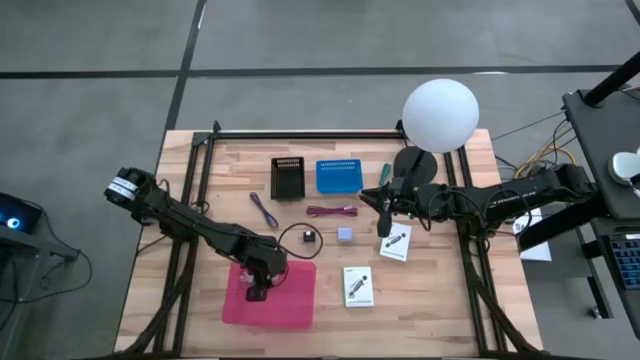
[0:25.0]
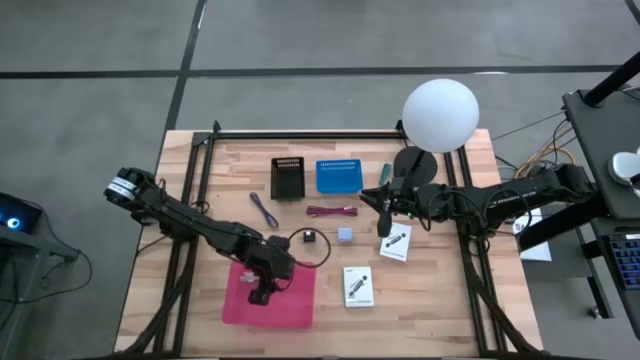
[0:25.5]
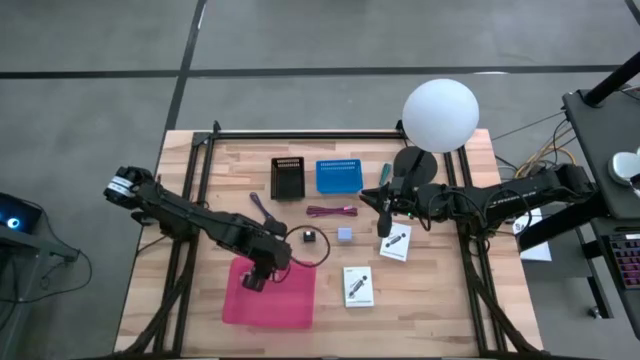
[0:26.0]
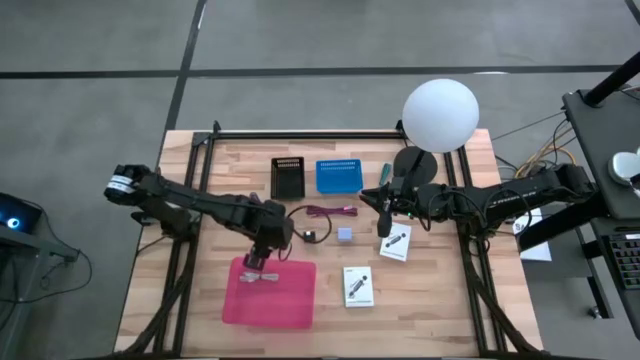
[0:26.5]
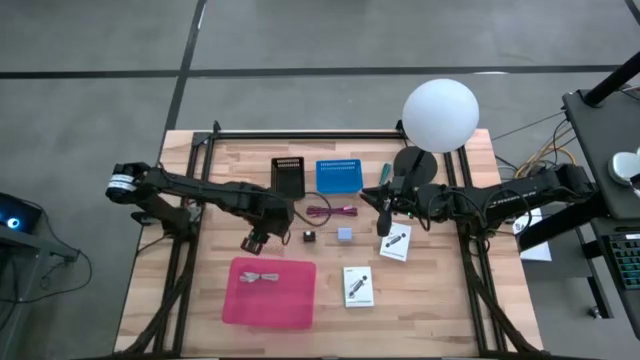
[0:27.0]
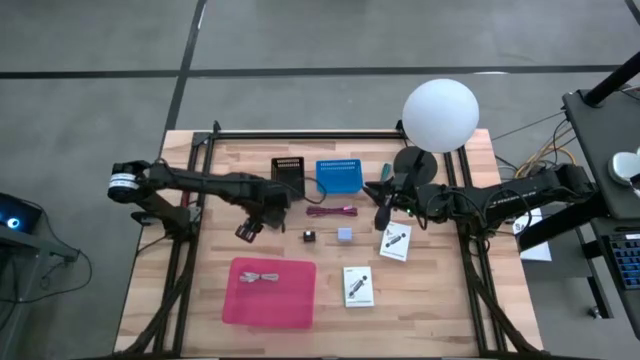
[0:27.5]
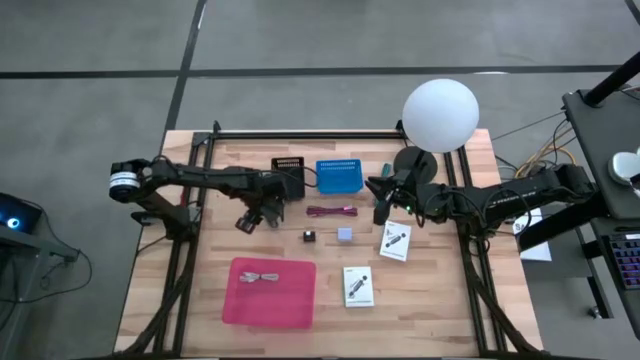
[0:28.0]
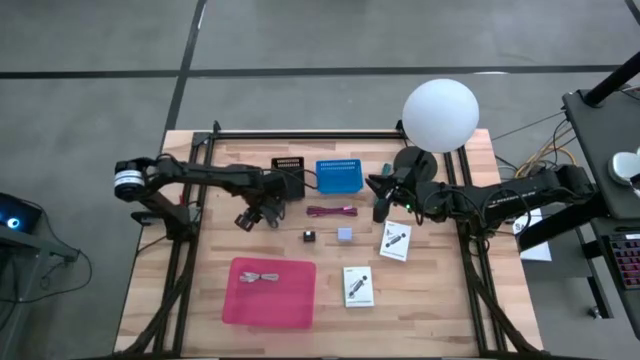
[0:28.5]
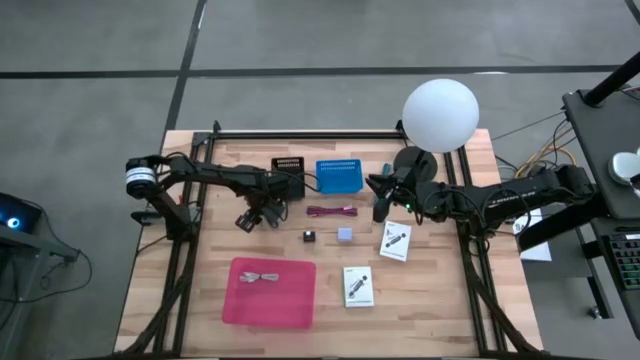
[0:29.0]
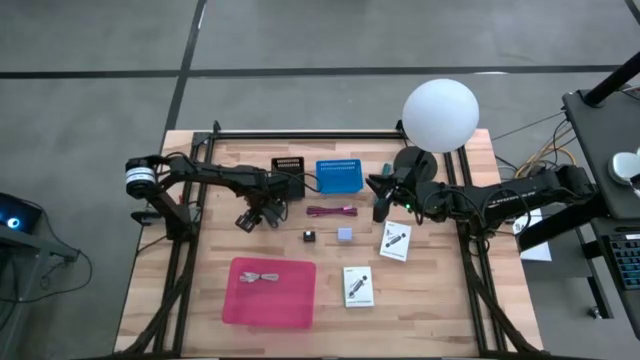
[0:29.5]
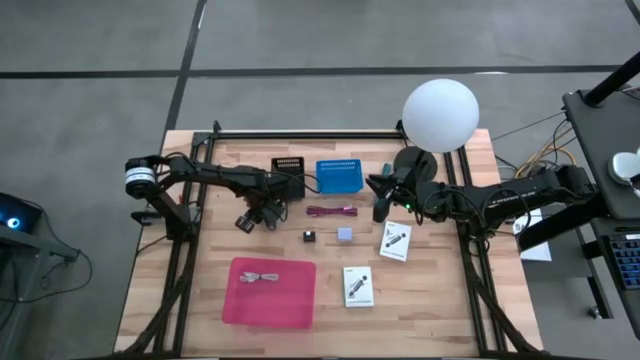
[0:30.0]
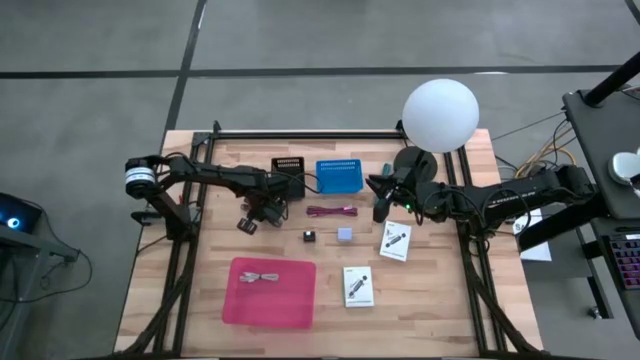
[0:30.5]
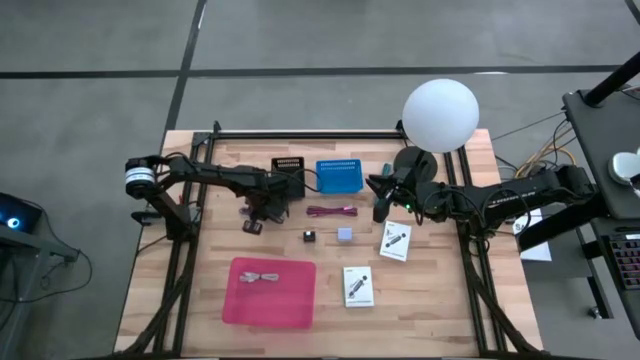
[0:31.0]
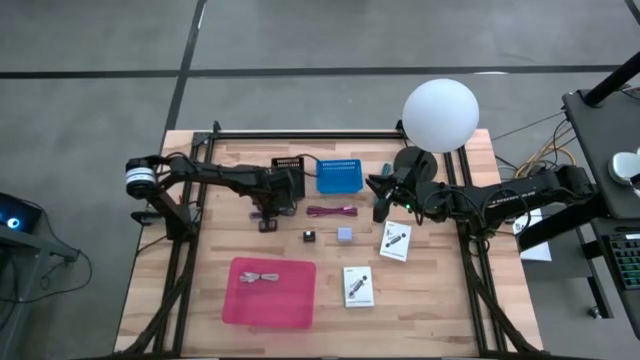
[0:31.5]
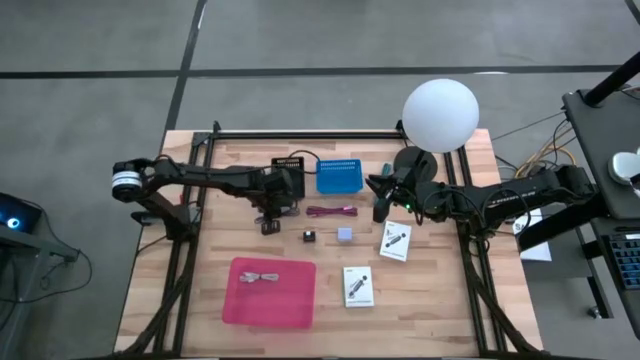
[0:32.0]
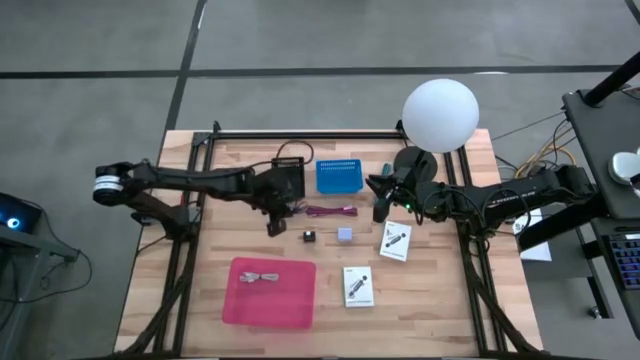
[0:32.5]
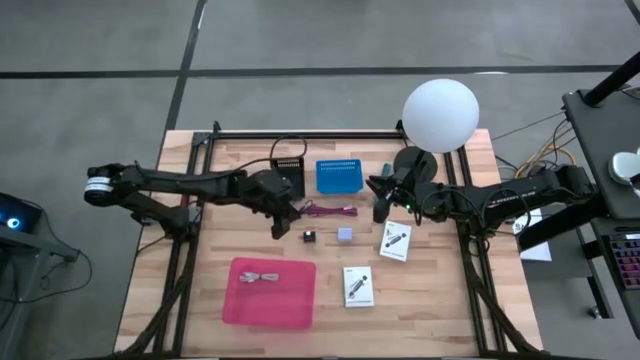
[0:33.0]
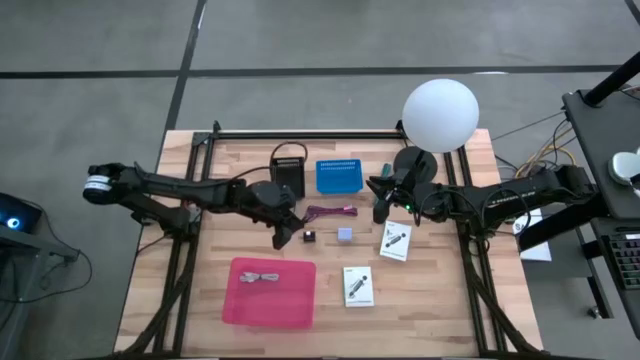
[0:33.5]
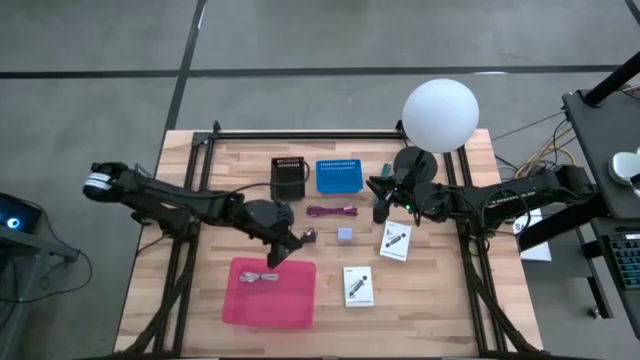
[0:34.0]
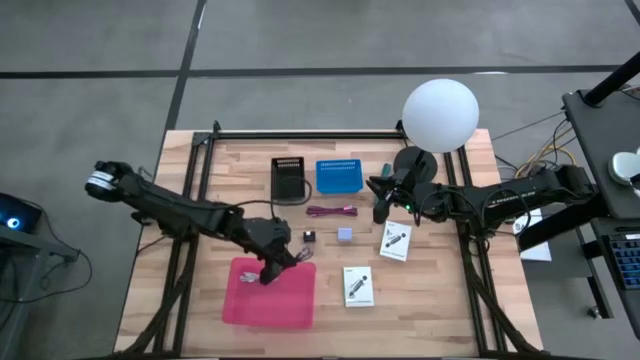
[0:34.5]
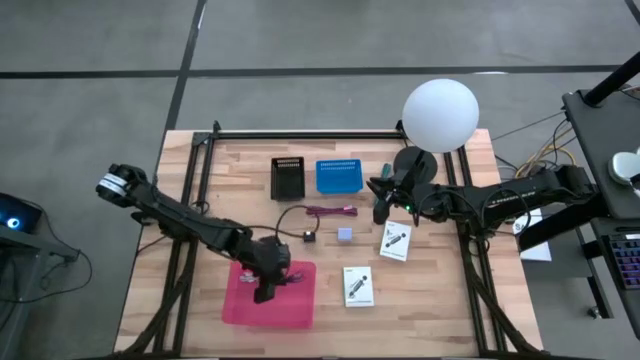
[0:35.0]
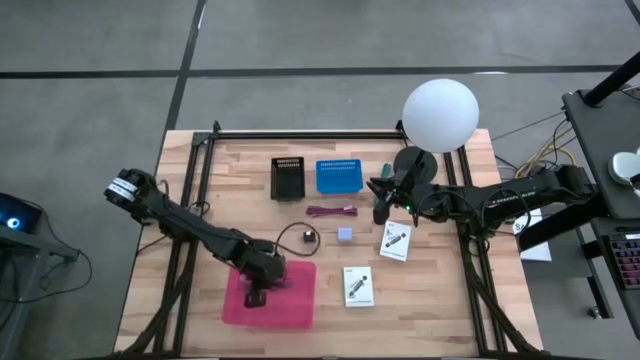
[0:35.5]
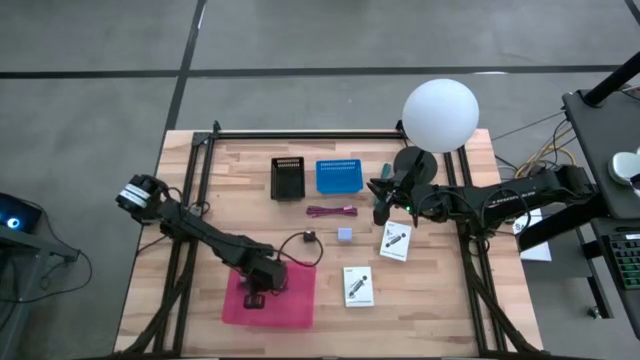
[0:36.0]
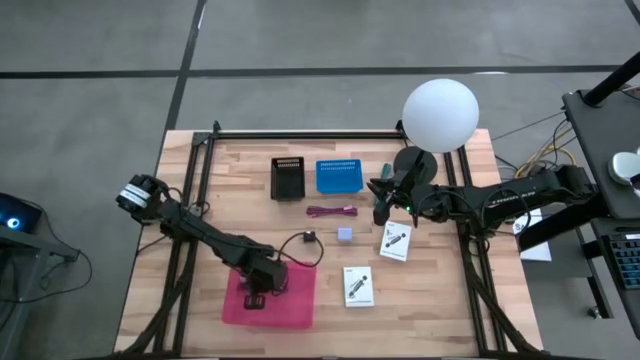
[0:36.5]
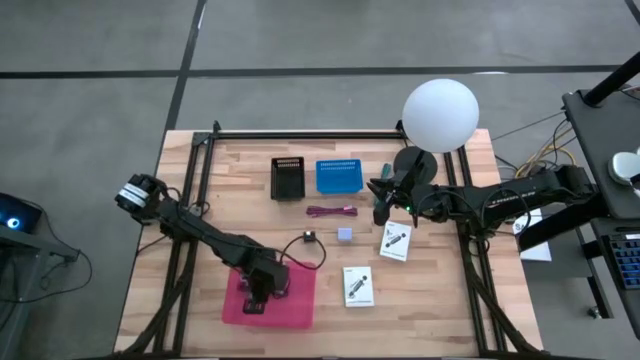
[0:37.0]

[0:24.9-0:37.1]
Task: Pick and place items into bin
Put the blue charger cable into the pink bin

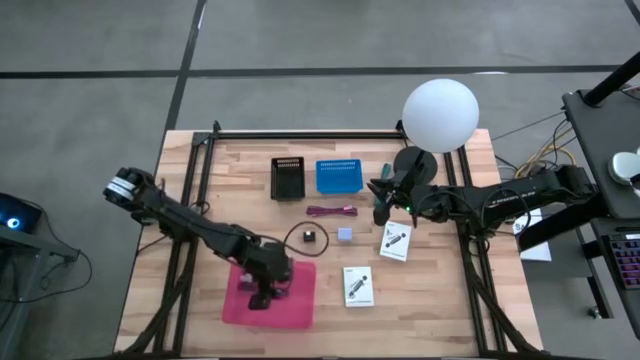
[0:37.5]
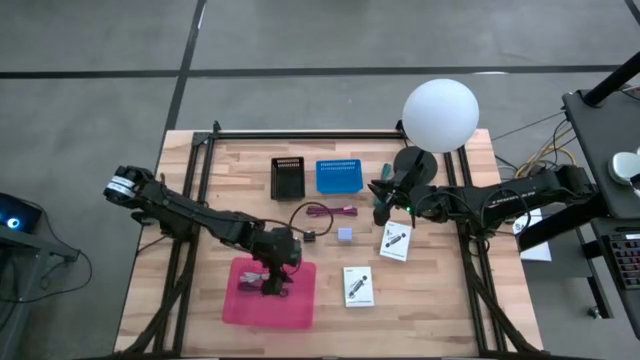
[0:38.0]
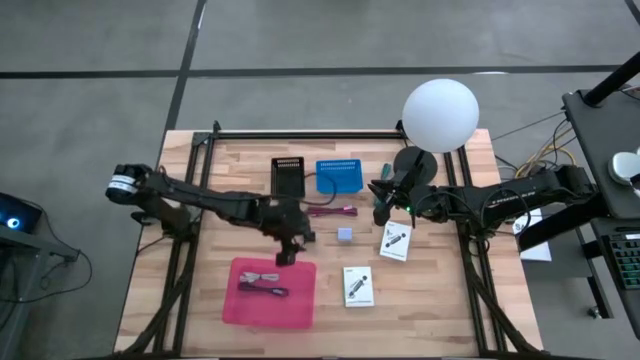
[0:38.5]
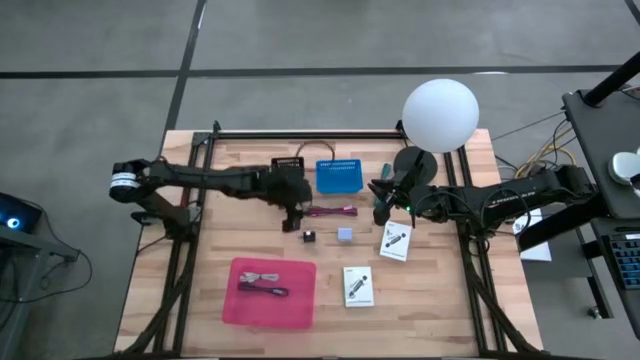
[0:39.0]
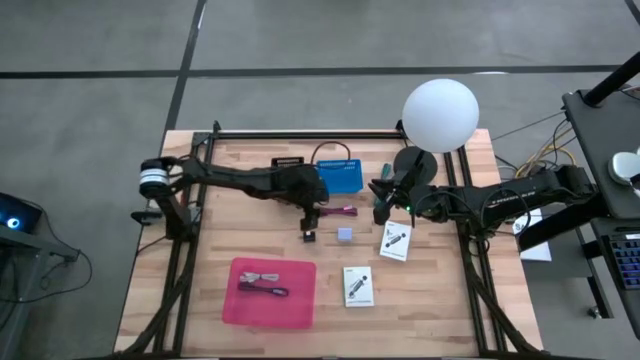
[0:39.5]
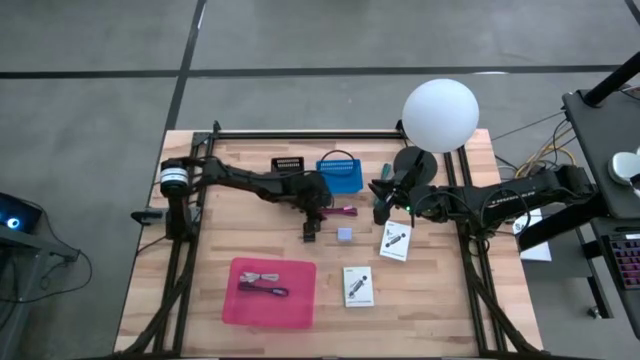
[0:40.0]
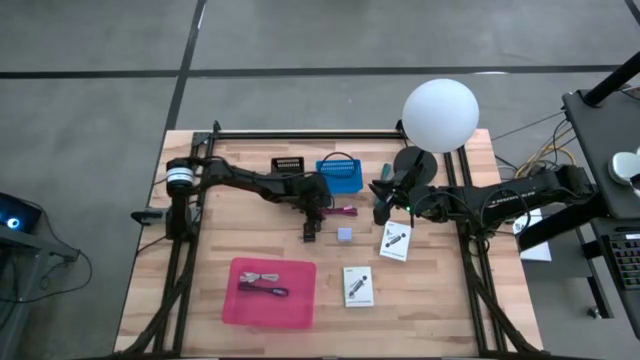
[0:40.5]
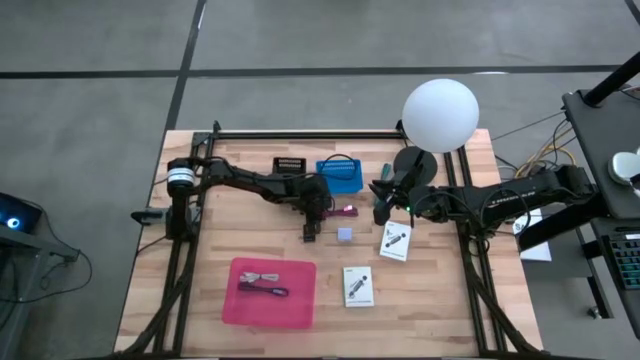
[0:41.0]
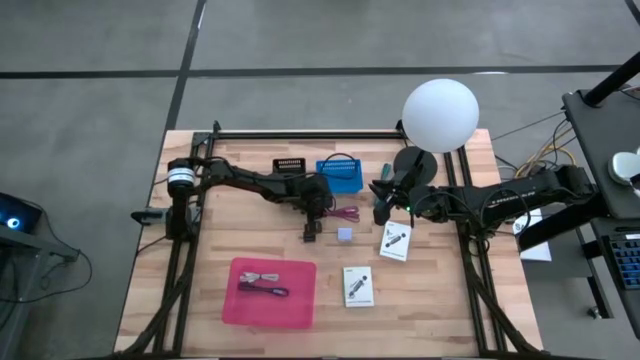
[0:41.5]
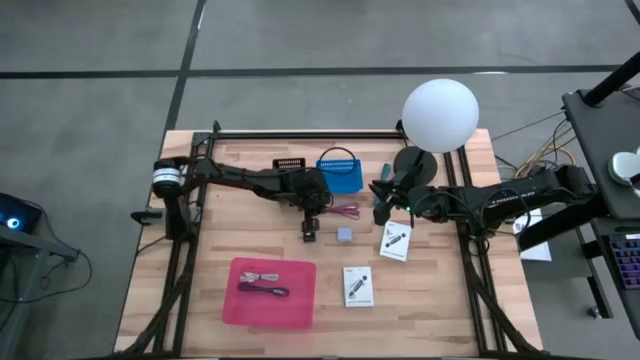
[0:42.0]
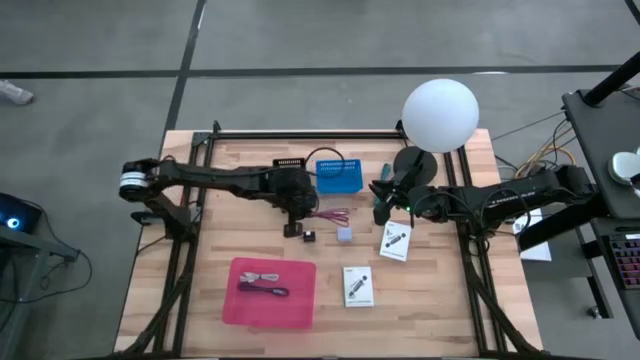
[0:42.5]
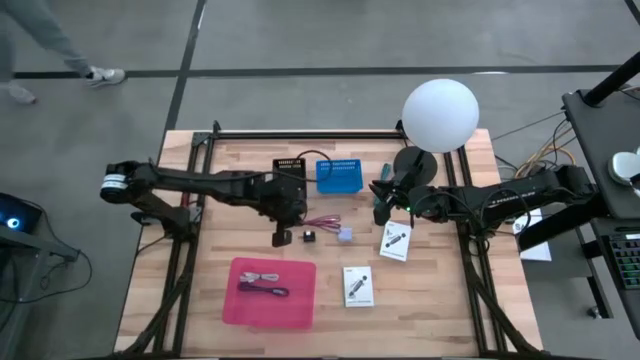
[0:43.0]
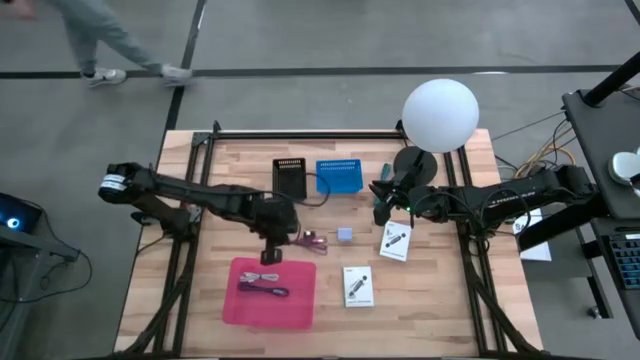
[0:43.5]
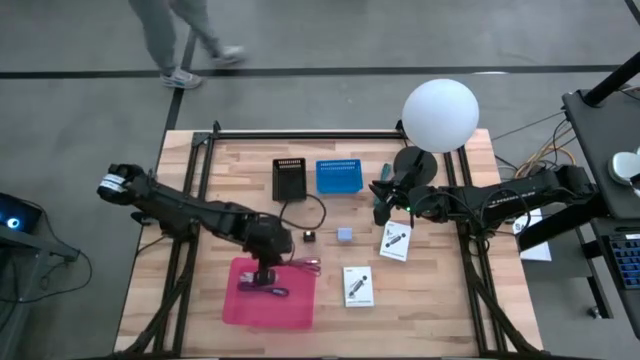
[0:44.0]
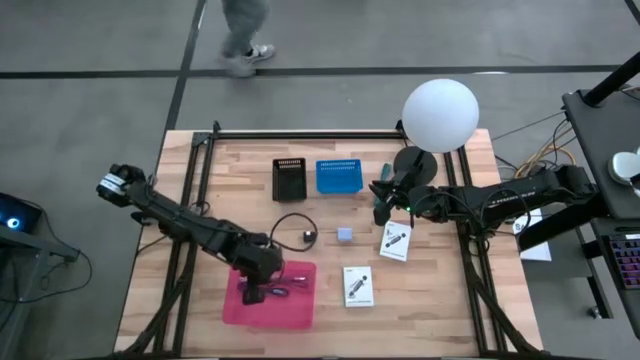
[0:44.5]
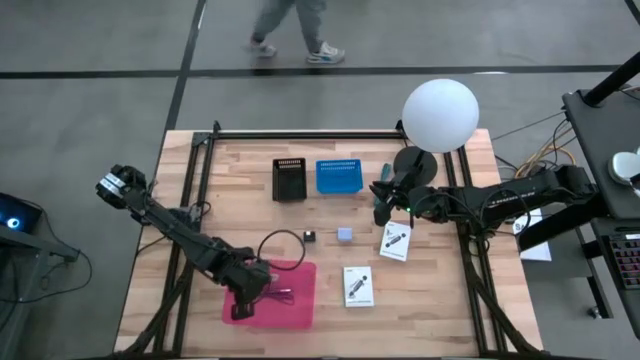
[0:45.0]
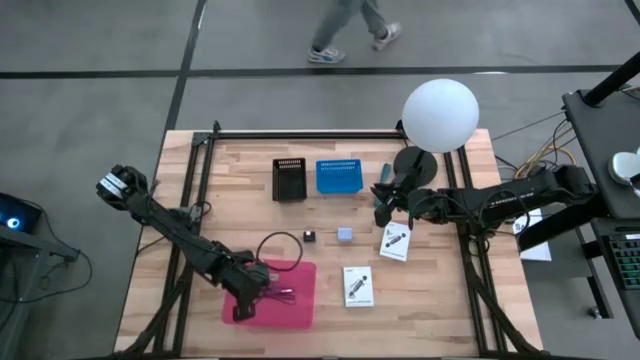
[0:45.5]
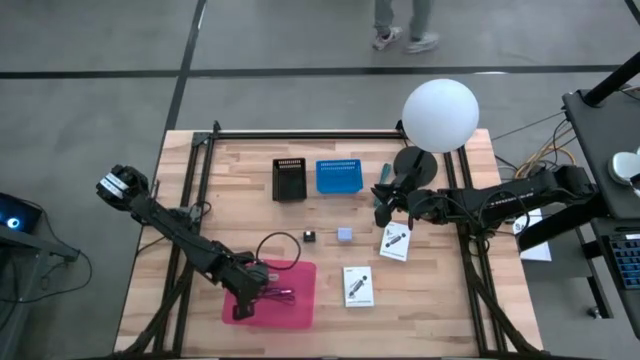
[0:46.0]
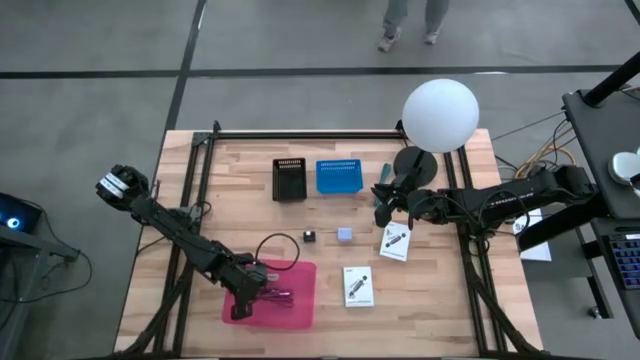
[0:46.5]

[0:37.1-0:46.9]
Put the pink charger cable into the pink bin
